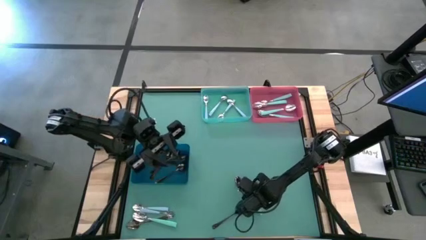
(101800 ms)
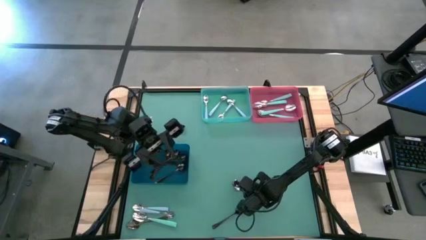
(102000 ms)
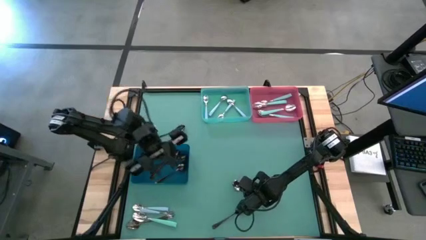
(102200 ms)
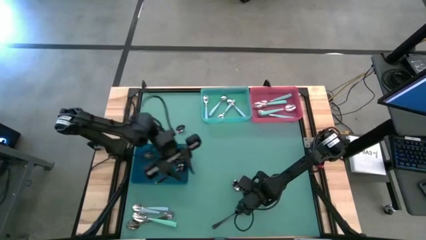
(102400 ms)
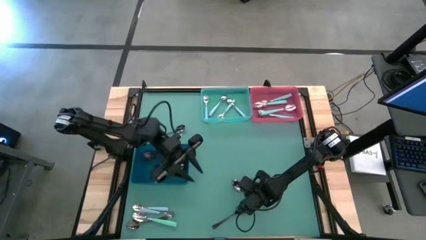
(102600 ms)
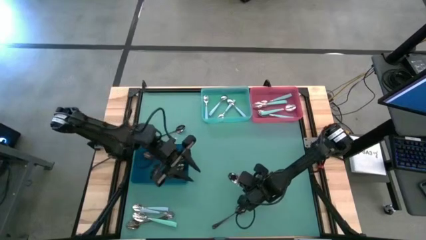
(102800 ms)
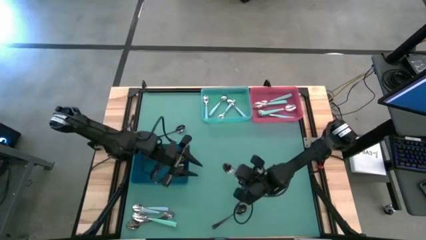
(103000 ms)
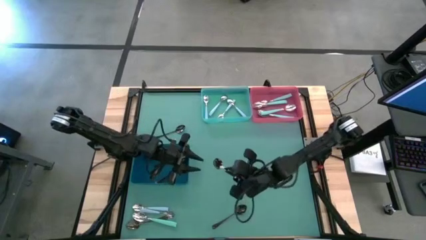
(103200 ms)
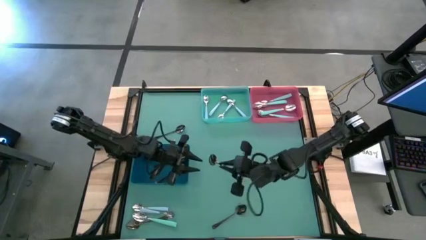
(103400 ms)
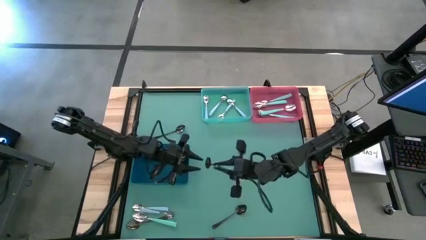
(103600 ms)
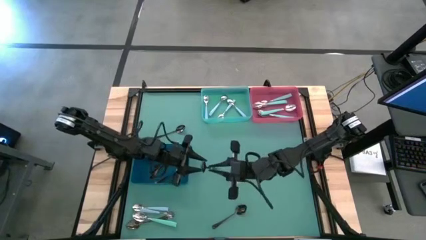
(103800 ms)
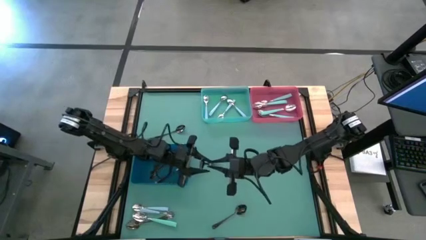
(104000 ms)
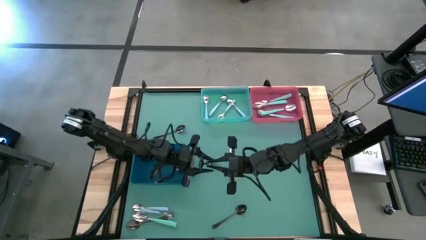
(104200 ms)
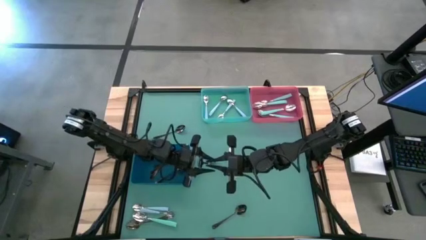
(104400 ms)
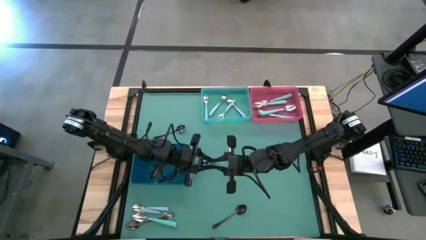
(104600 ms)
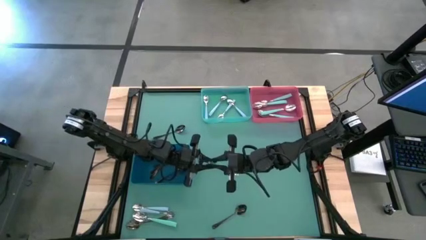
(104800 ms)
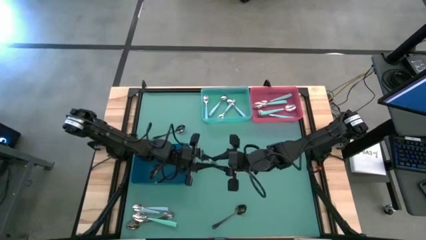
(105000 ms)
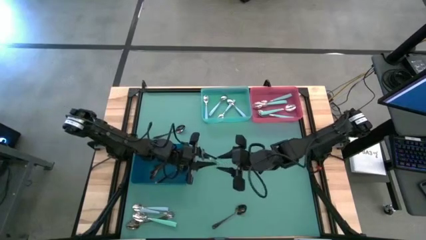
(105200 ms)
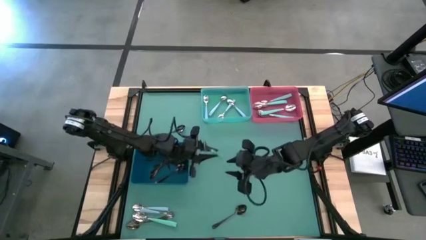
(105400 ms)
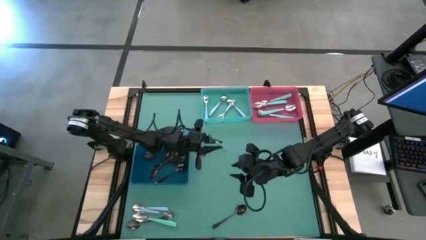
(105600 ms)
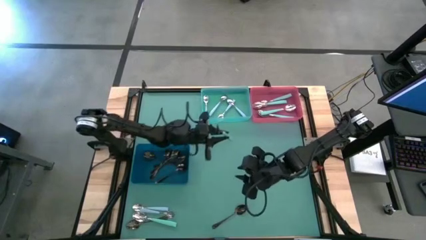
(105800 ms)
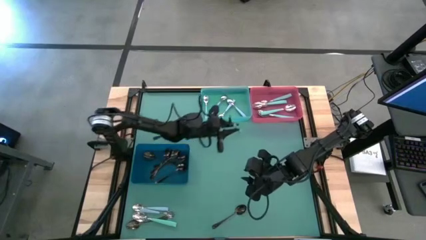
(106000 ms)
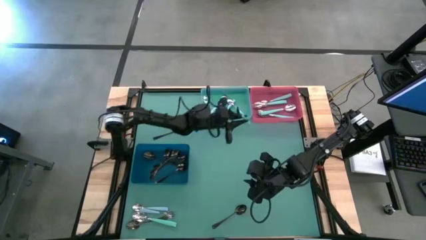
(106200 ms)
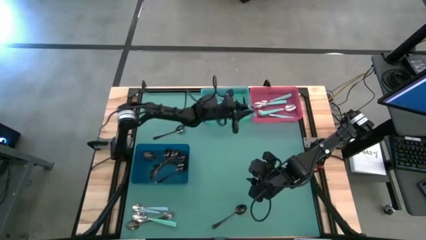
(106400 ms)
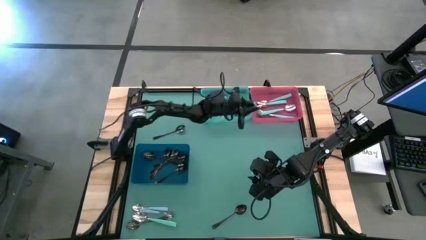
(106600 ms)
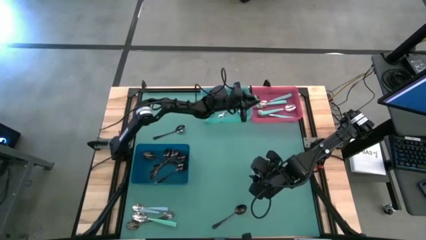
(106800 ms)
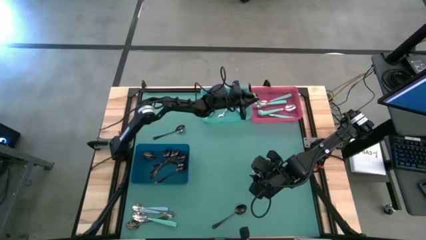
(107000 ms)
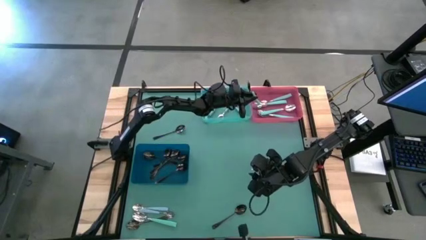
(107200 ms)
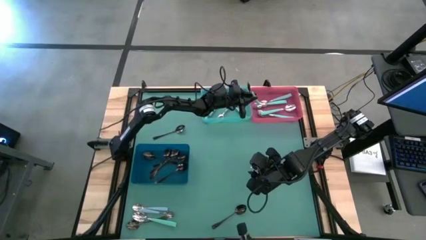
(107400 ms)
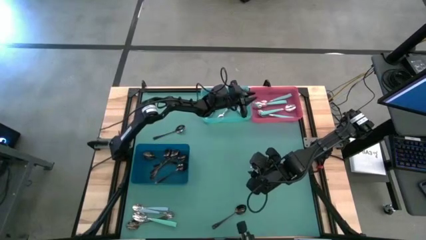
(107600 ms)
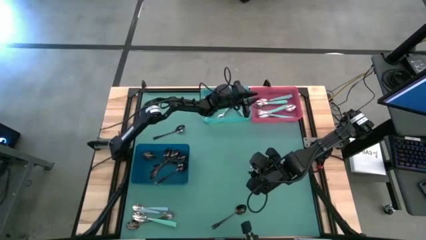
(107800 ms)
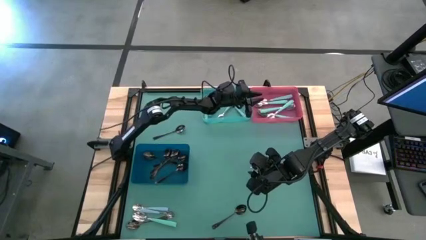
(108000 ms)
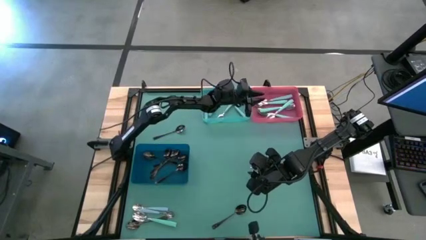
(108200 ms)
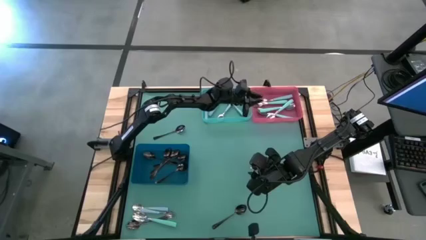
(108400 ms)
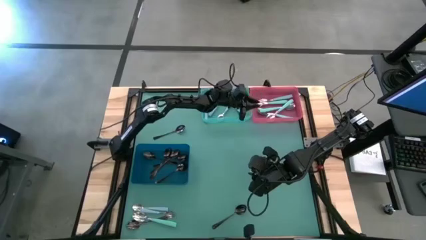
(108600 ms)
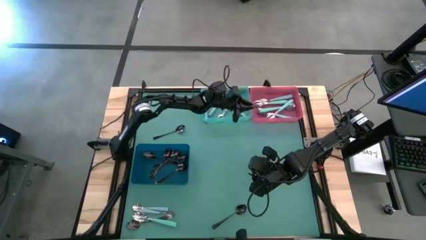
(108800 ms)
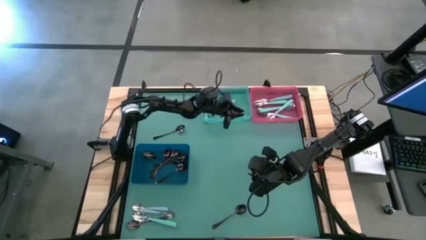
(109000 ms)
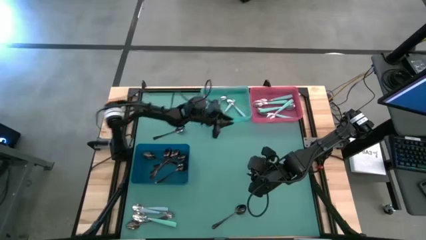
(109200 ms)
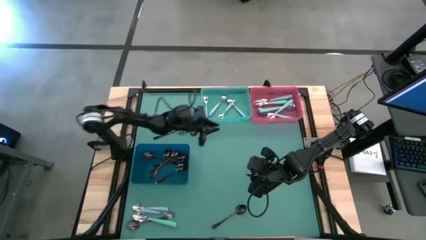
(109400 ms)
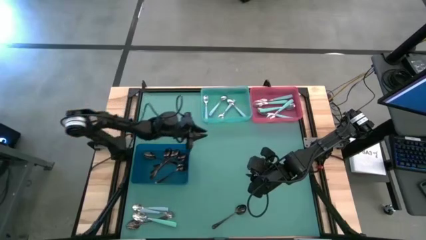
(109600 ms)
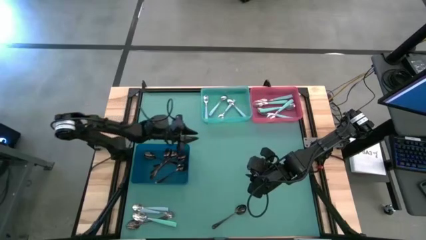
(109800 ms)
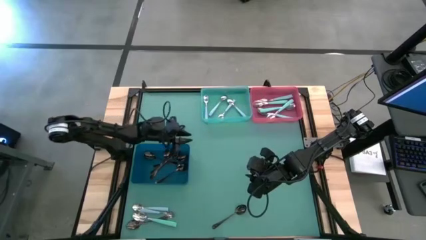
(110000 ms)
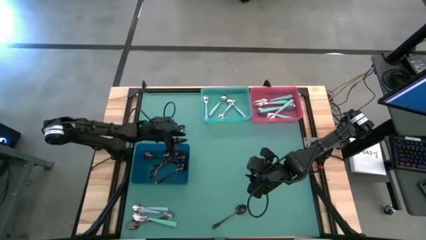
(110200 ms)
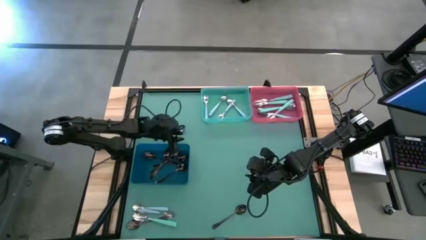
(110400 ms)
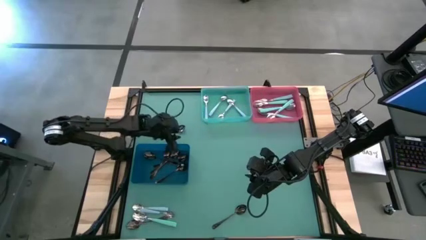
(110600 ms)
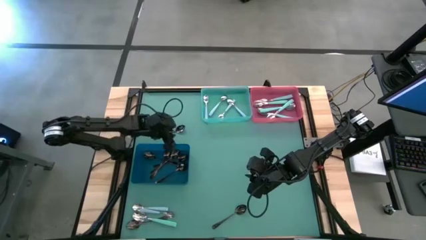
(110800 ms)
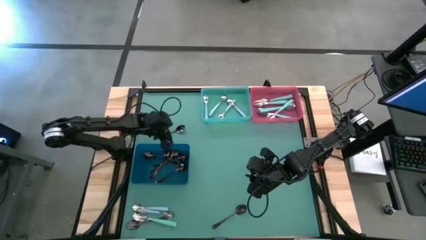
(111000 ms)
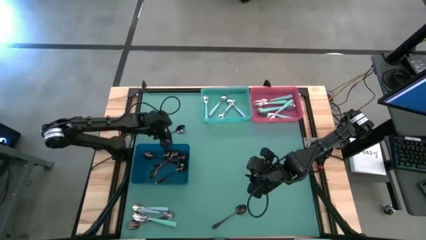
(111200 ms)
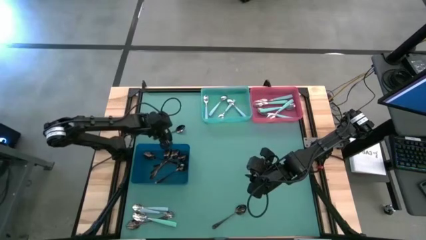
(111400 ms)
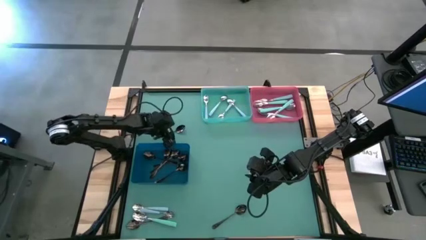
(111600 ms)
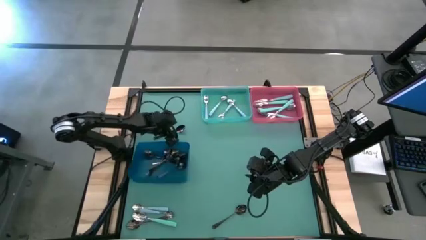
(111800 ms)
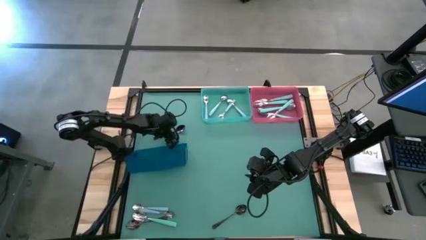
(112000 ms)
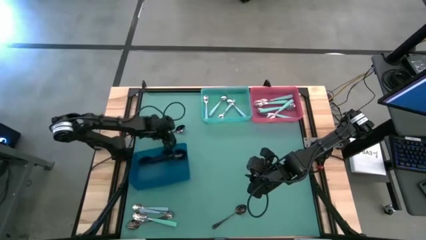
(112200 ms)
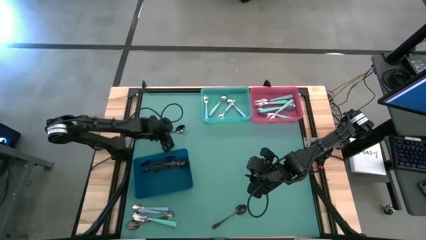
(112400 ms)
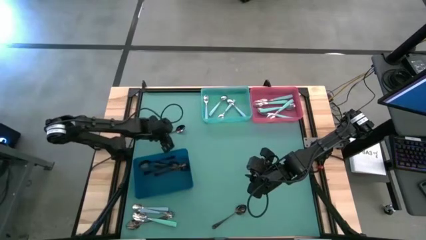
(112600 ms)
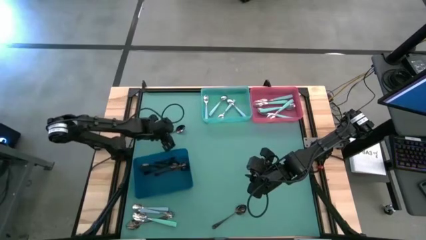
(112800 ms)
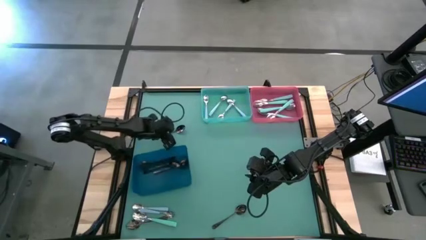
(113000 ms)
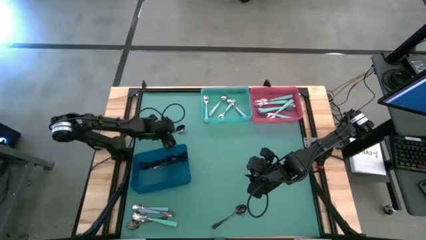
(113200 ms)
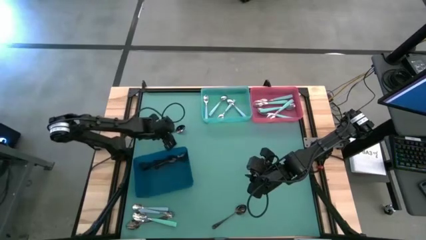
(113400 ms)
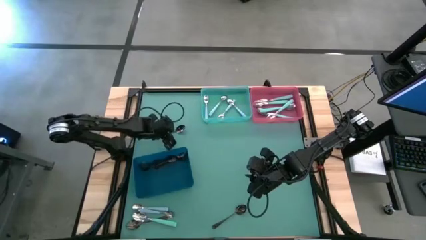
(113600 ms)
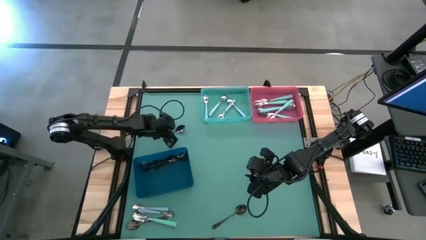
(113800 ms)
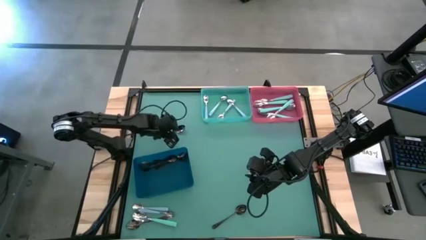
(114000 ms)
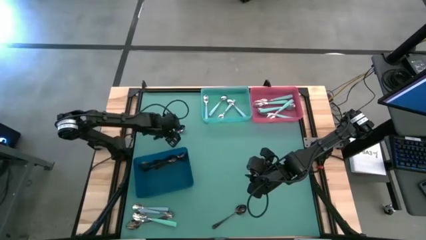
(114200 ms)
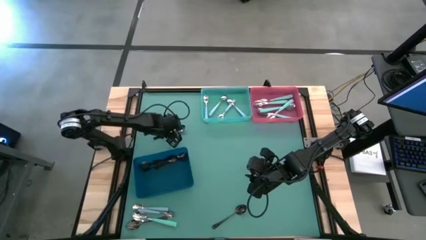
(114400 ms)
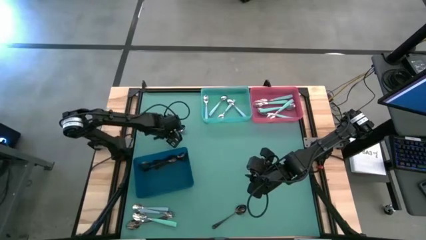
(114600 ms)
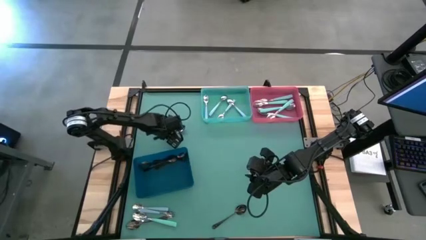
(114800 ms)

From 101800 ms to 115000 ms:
Task: Sort silverware by color (type)
Put the bottom right black spoon into the dark blue bin

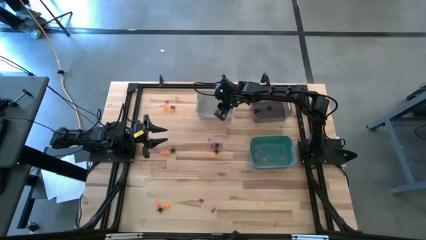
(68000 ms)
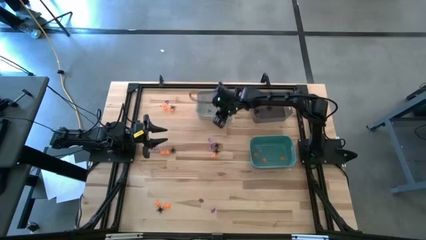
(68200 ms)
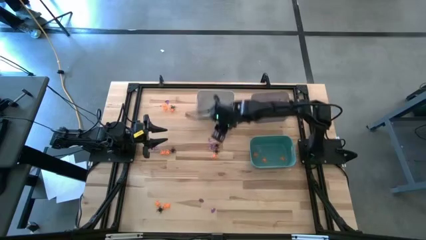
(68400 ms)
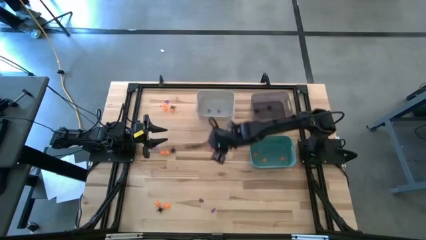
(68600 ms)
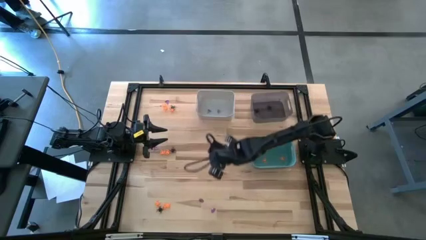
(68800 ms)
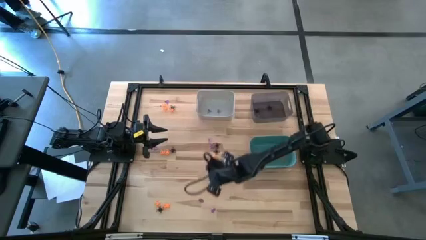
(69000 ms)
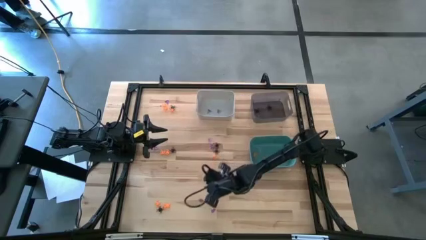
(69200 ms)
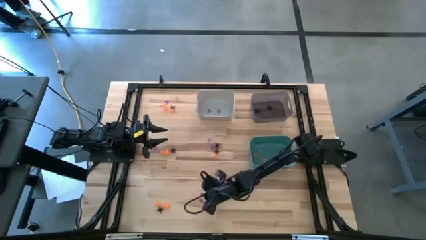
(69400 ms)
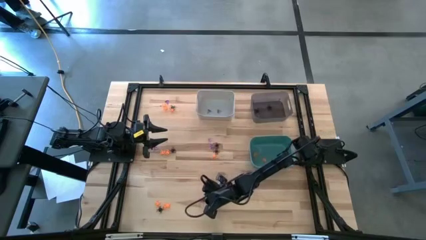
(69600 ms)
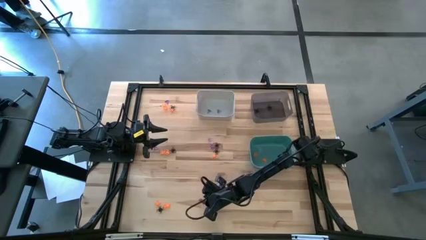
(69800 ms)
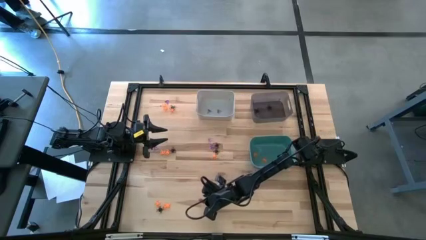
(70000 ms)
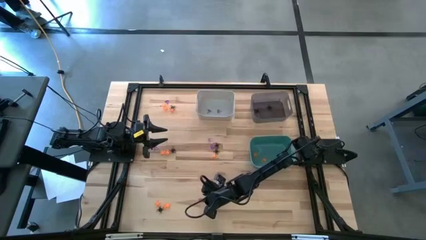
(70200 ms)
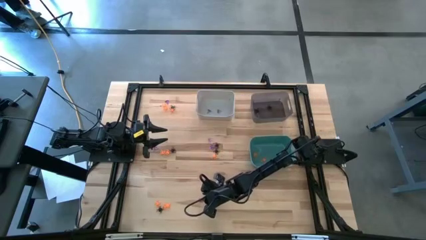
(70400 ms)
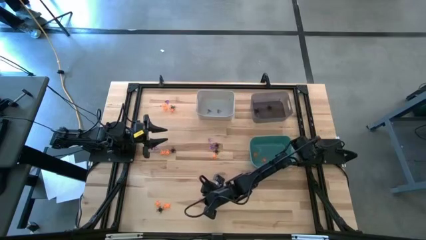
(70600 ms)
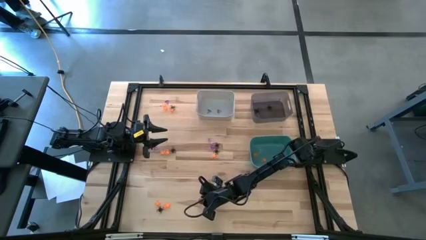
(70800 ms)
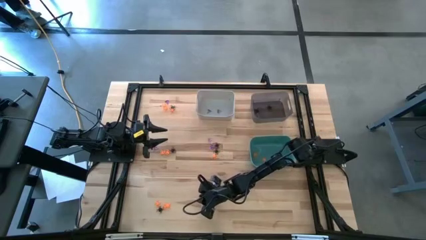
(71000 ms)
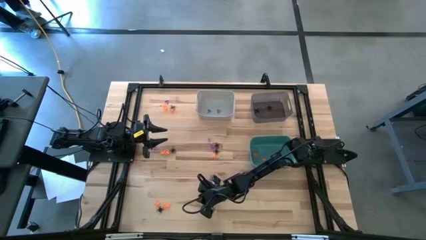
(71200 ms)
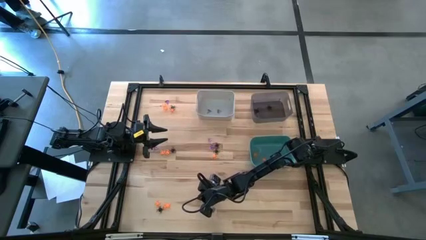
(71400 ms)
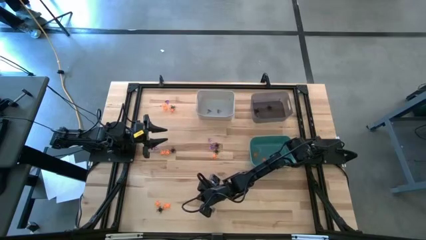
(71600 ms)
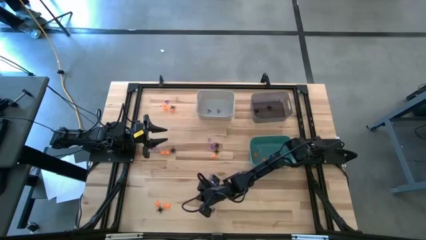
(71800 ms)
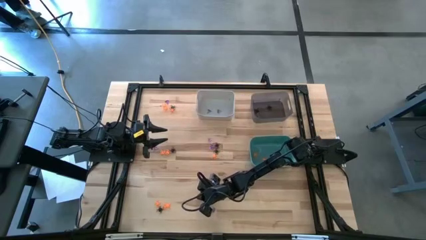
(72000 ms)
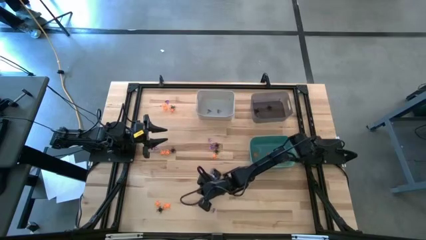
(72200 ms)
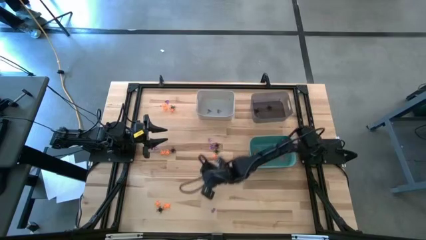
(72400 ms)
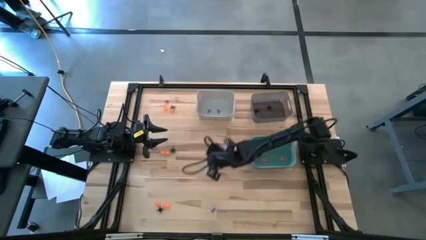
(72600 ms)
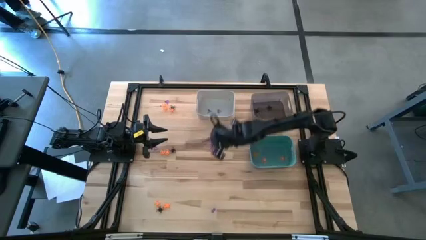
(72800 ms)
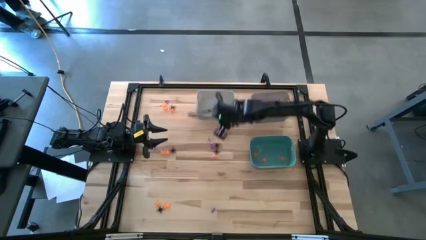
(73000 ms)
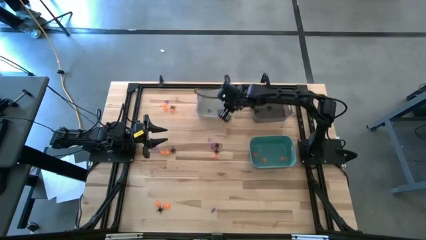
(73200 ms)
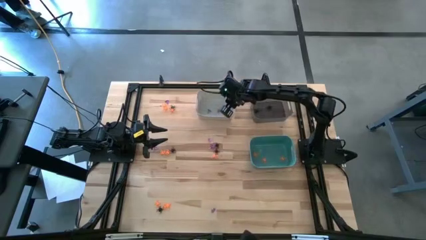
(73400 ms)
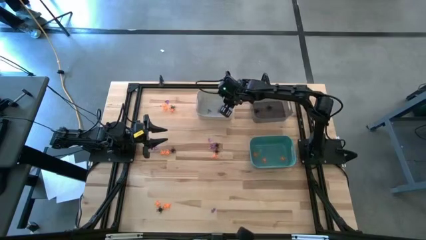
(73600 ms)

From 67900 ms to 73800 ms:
Task: Sort Halloween decoration
Put the purple witch hat toy into the white bin
